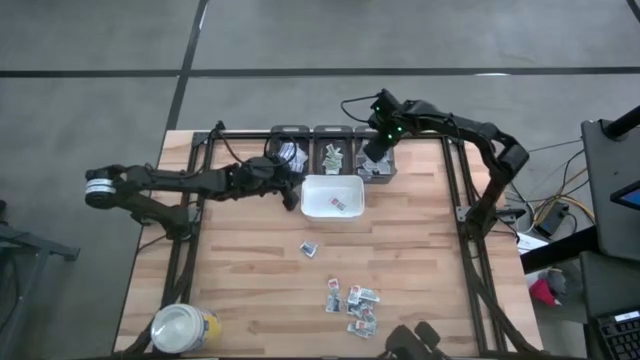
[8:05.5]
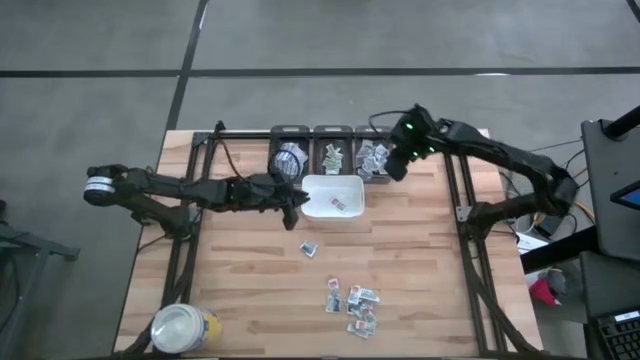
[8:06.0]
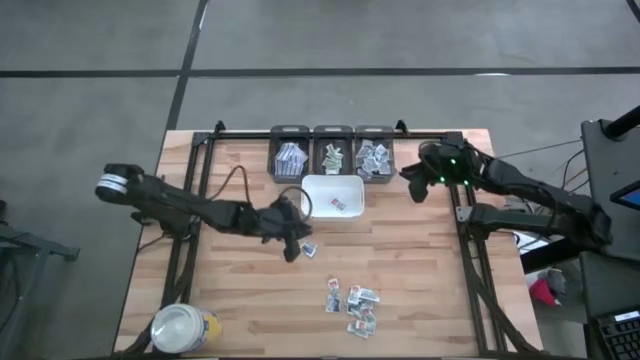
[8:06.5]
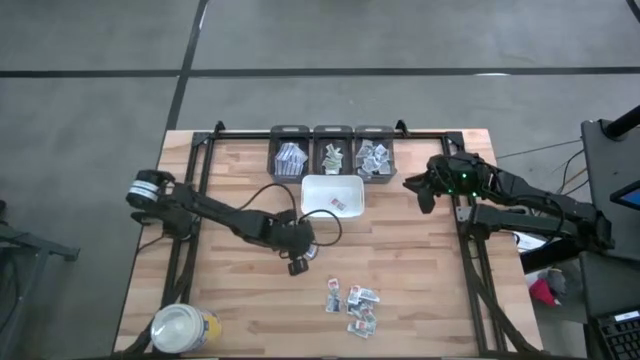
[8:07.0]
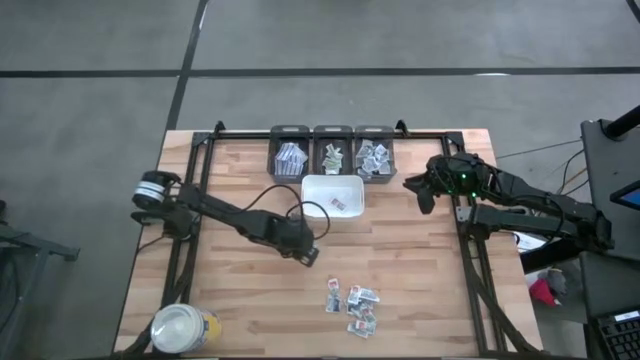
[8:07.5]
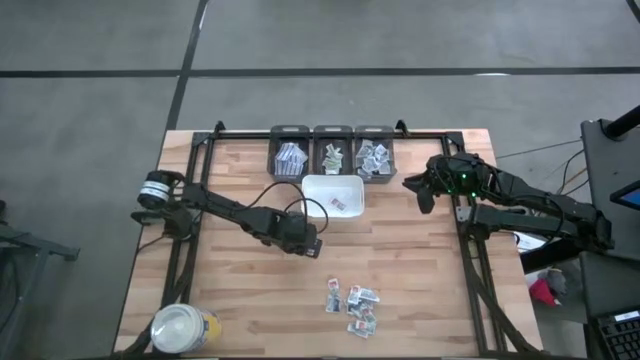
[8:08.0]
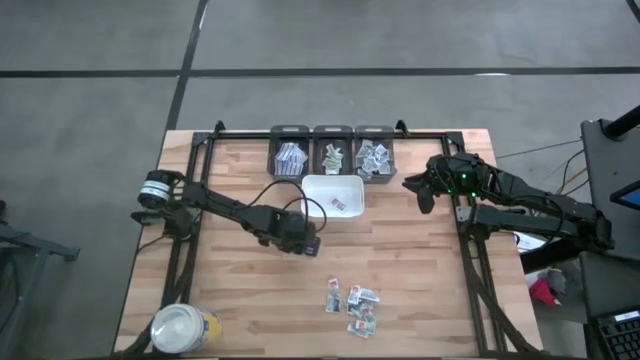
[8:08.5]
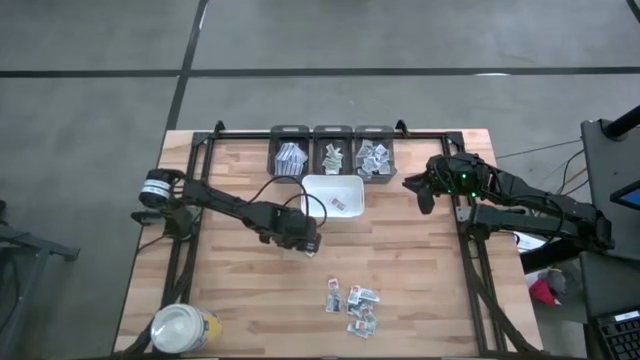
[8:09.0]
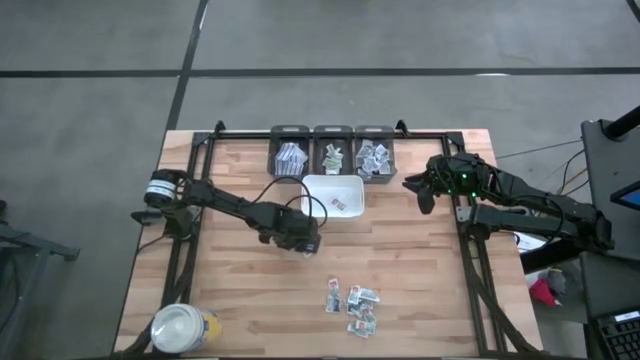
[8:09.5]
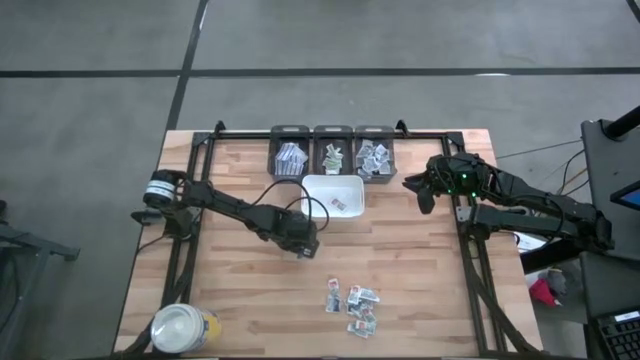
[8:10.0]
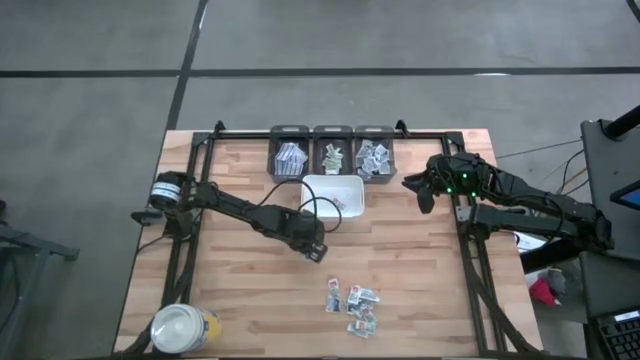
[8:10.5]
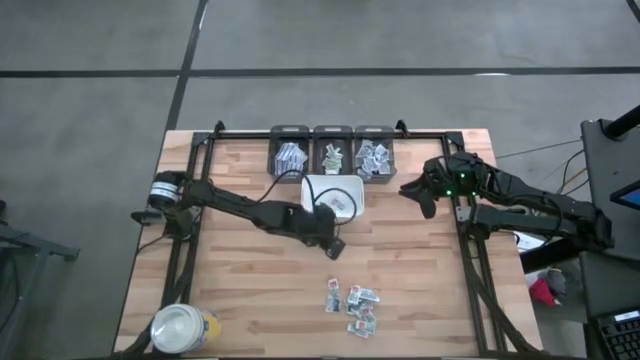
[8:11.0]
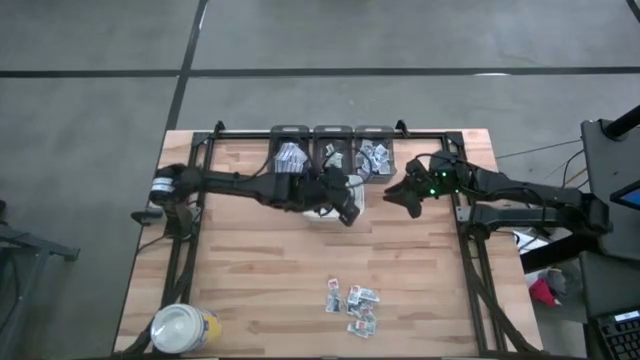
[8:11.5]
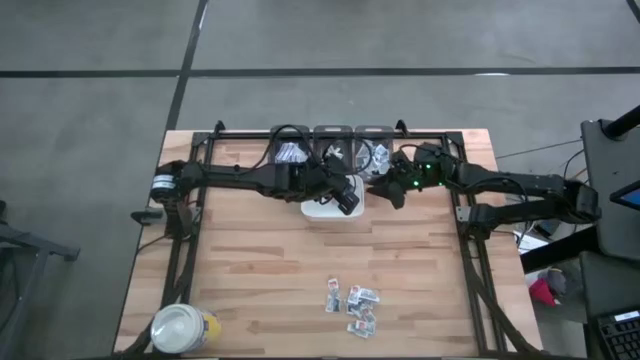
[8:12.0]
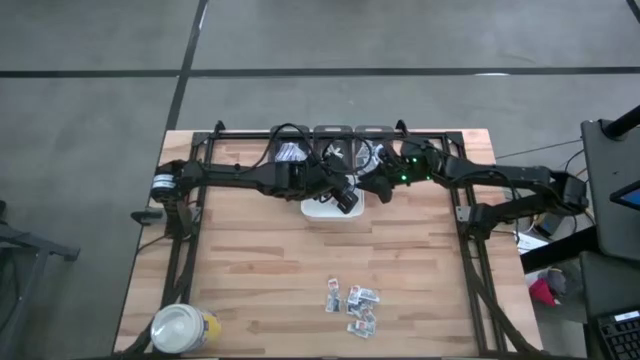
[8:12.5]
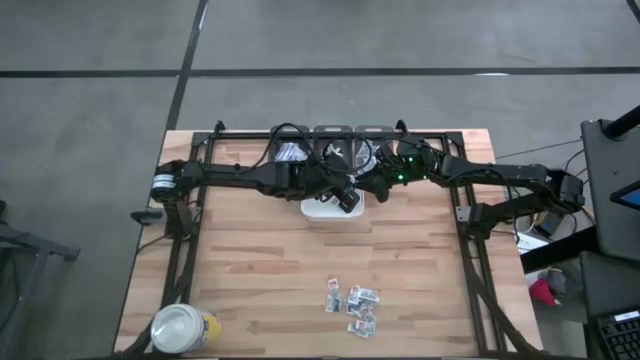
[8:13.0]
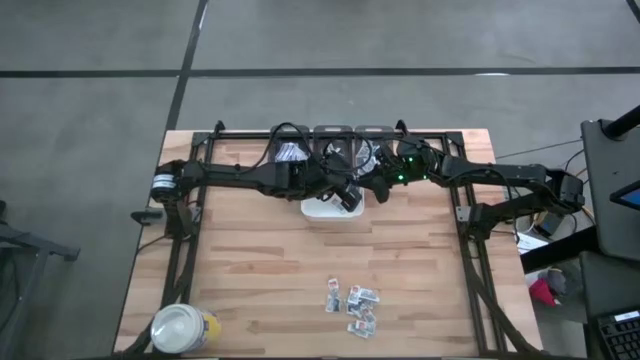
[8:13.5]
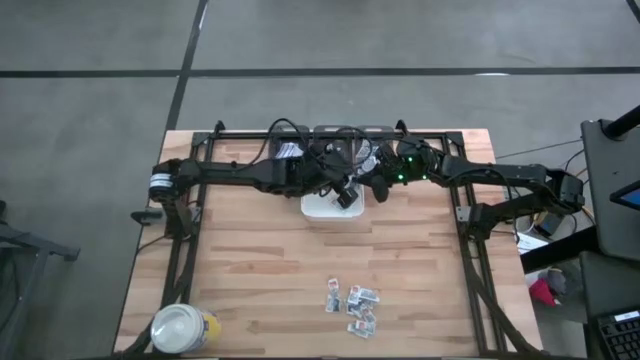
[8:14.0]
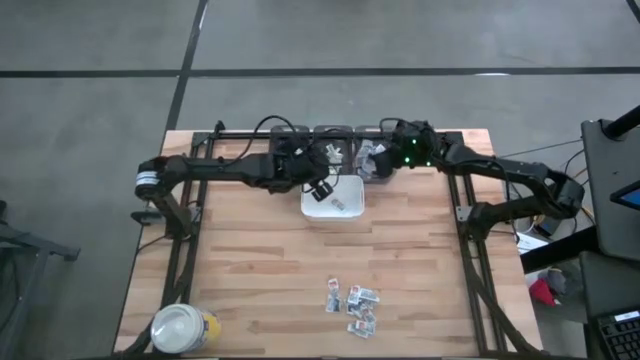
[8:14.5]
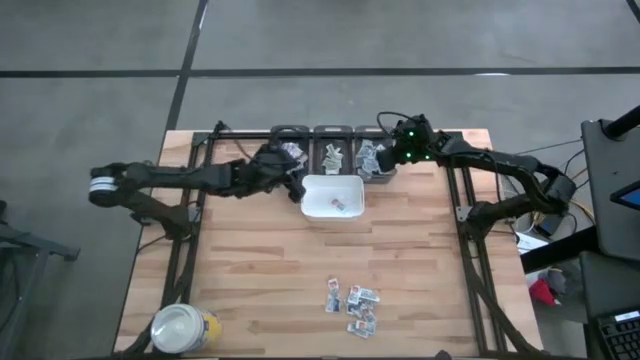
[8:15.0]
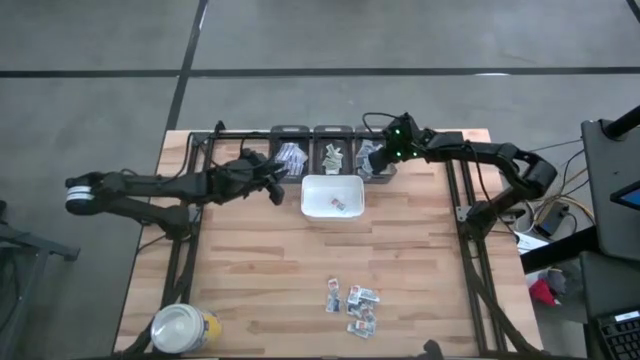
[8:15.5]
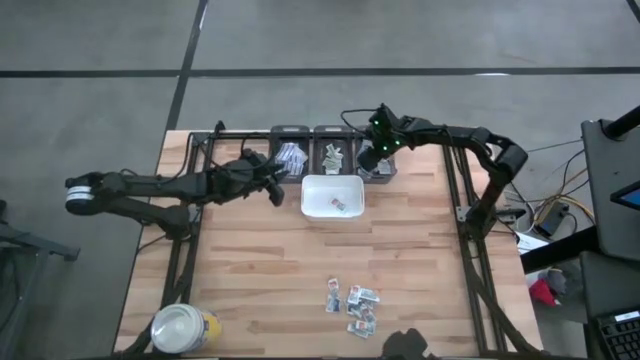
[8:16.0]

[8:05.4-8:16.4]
Task: Pick & Place First Aid Supplies
Put the white alcohol pad into the right black bin

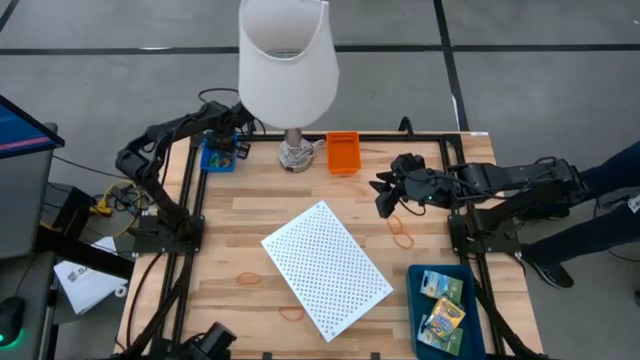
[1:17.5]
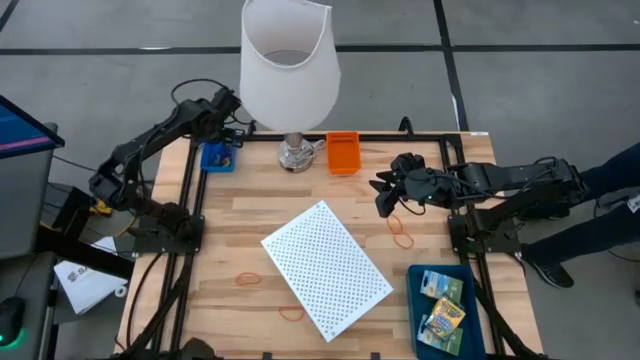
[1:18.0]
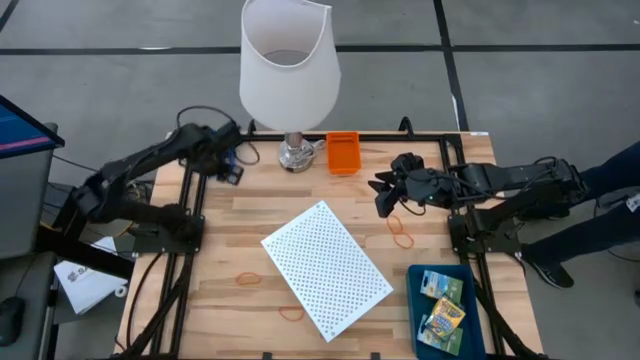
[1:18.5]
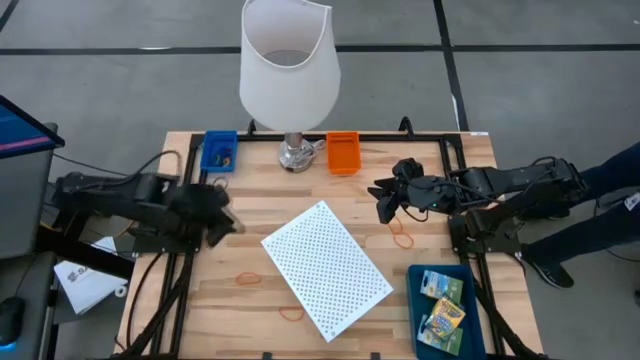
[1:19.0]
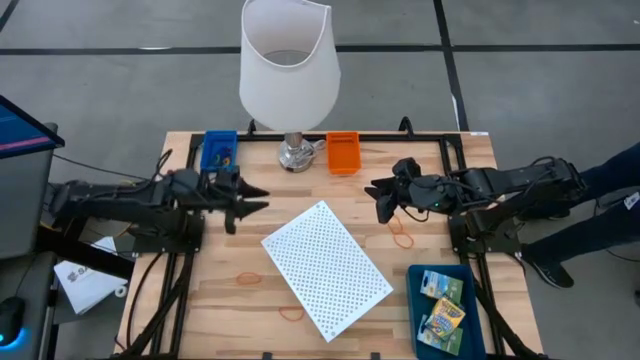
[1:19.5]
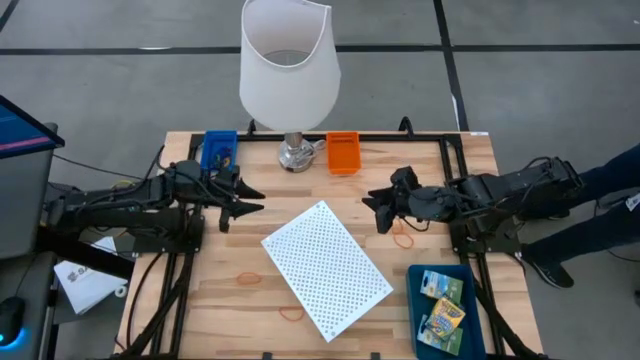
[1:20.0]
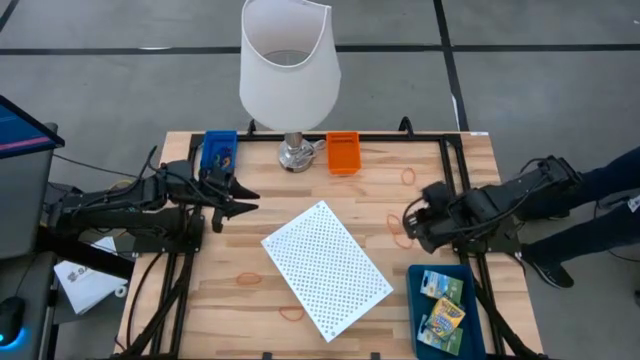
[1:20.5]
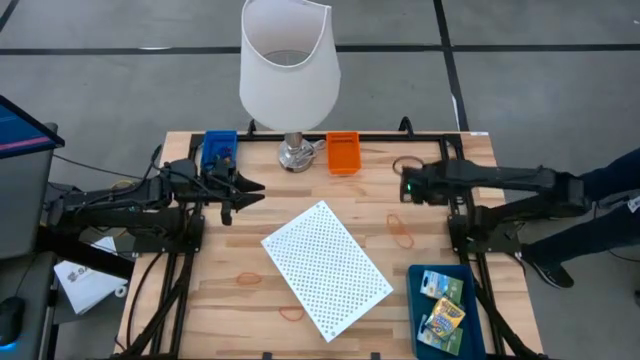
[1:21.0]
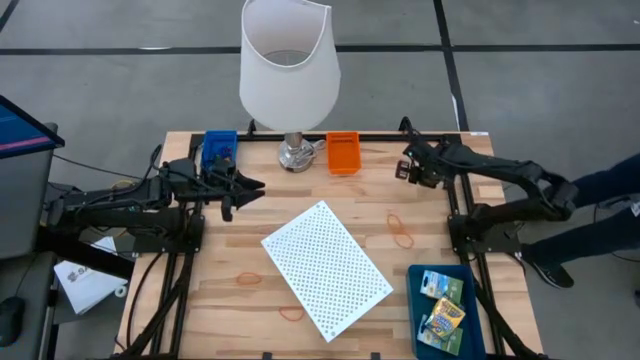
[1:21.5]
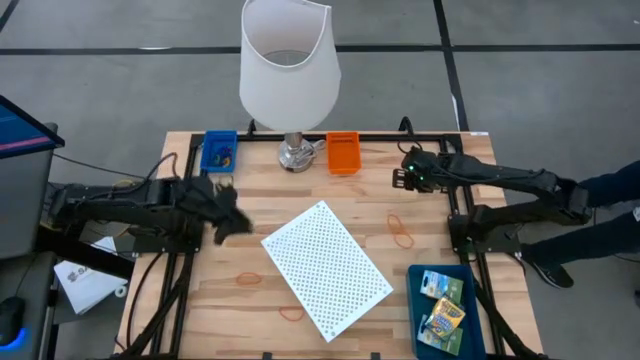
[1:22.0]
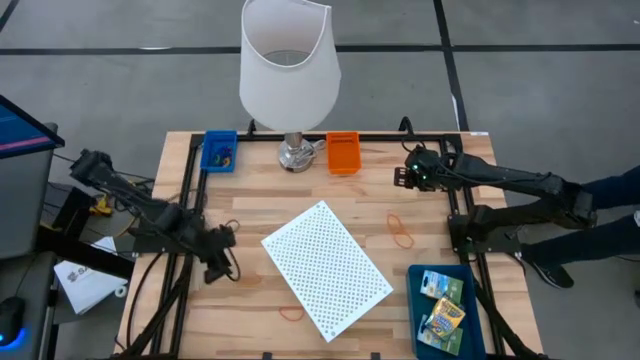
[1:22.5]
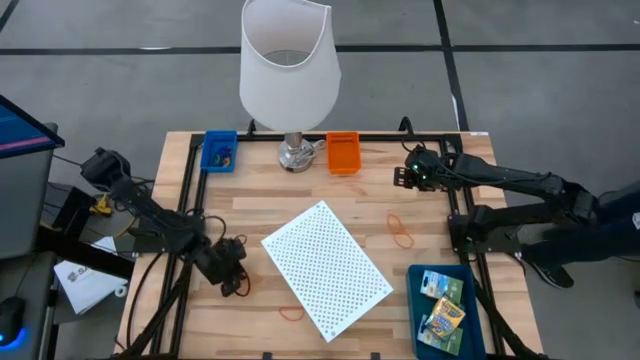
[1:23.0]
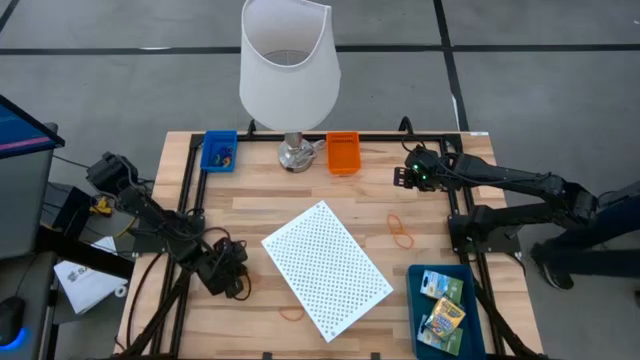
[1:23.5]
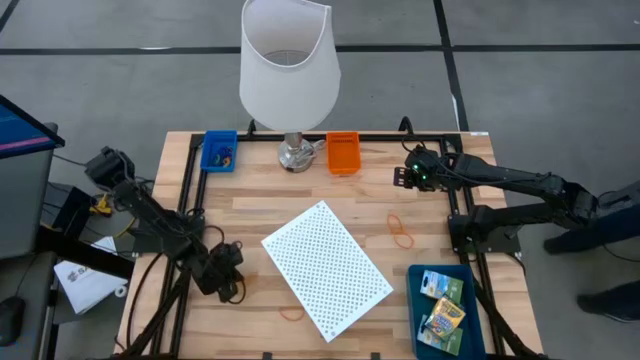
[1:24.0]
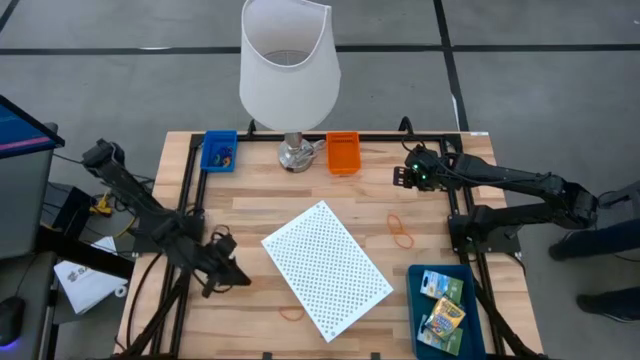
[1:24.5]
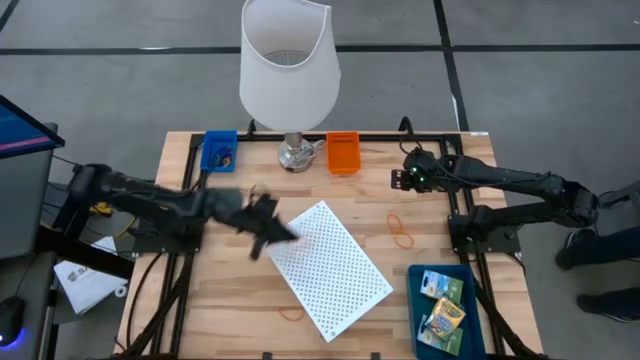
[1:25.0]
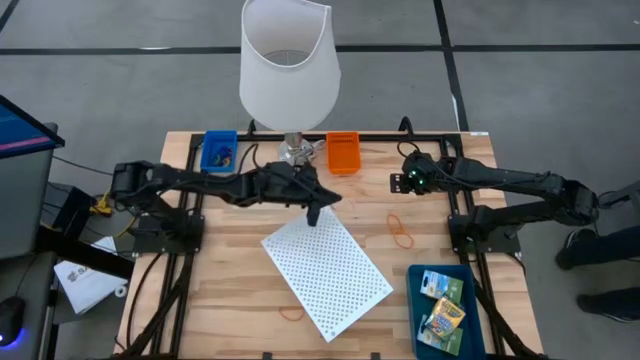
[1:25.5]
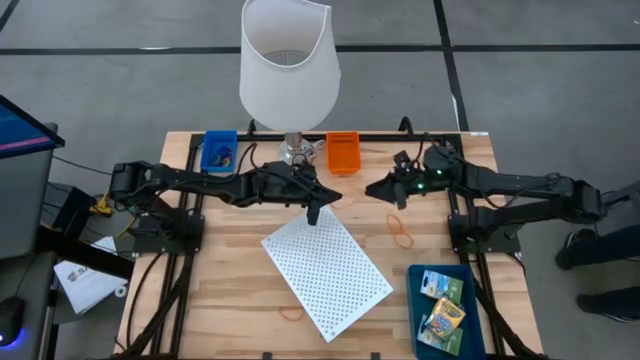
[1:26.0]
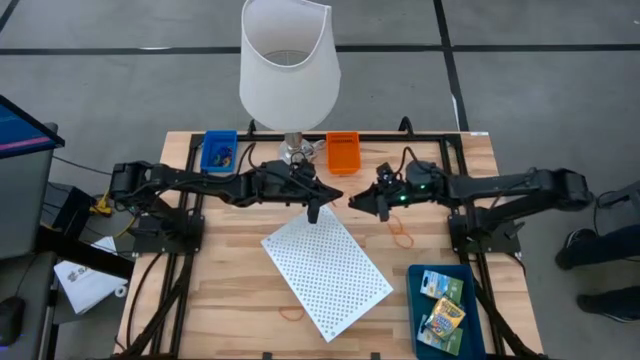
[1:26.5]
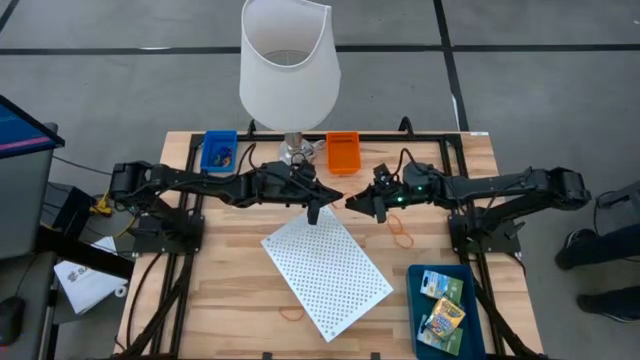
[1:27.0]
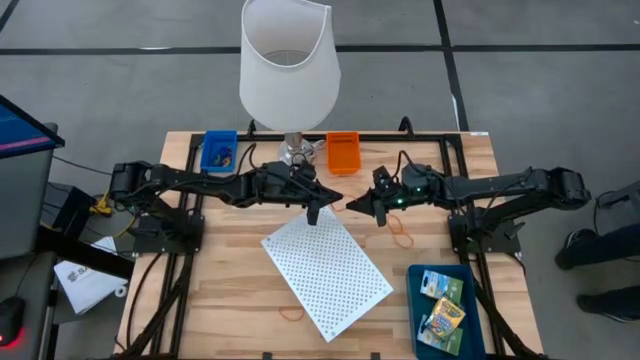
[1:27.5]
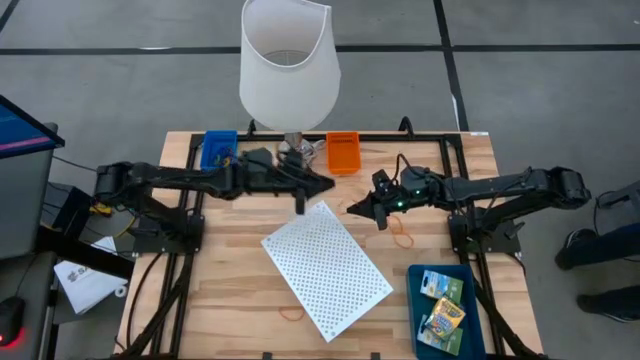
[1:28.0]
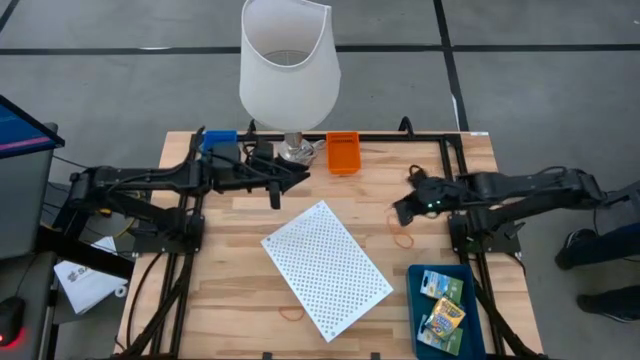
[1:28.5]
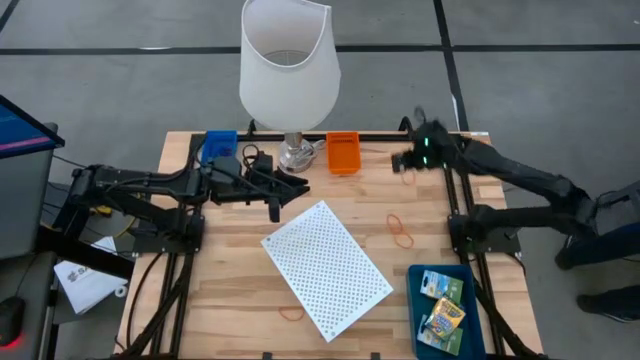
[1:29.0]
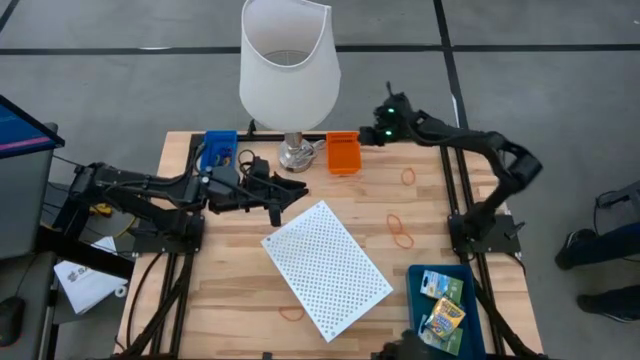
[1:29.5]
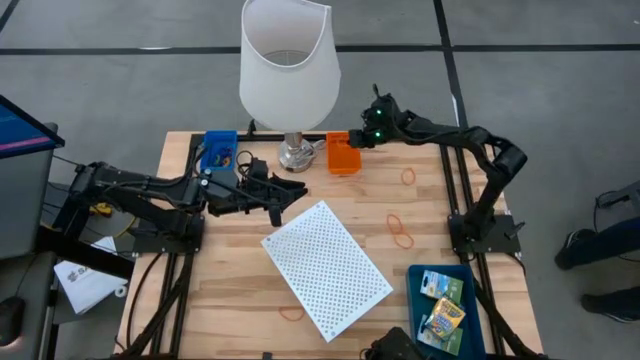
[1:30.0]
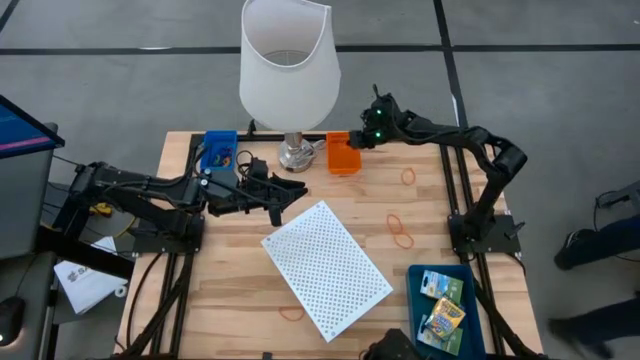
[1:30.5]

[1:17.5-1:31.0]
Task: Pick & Place Office Desk Supplies
Put the orange rubber band into the blue bin
